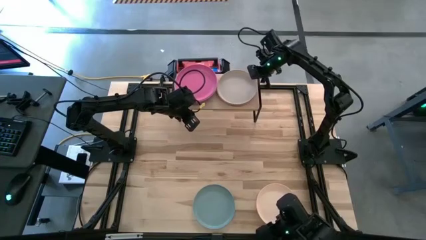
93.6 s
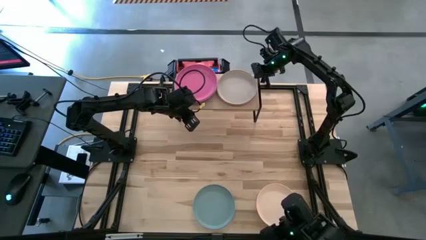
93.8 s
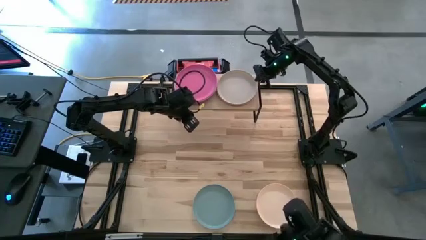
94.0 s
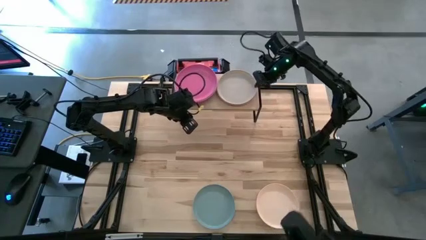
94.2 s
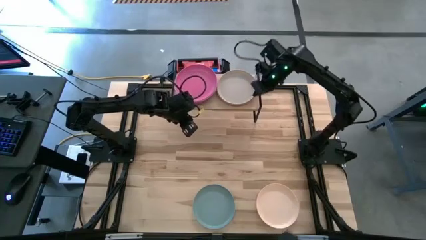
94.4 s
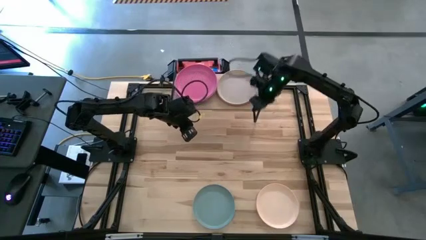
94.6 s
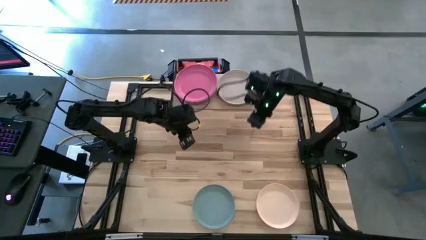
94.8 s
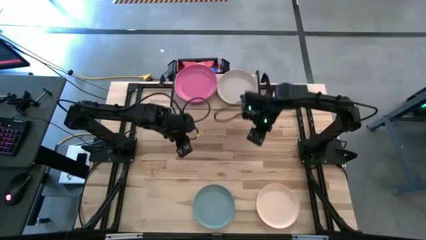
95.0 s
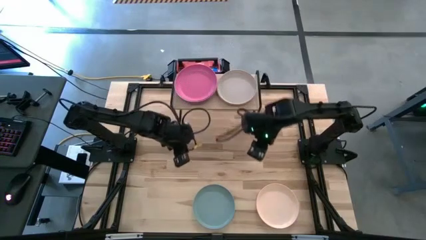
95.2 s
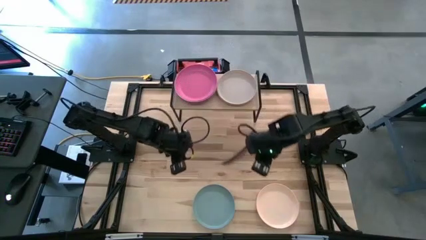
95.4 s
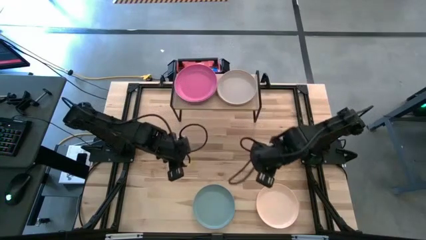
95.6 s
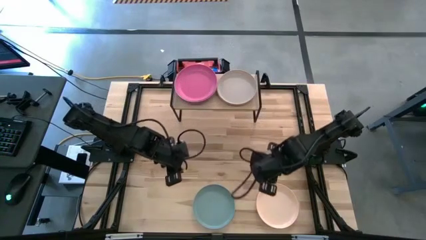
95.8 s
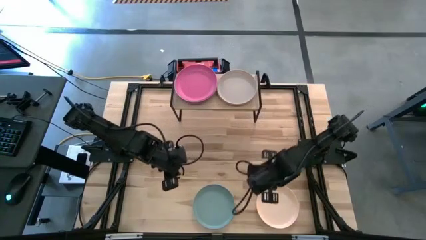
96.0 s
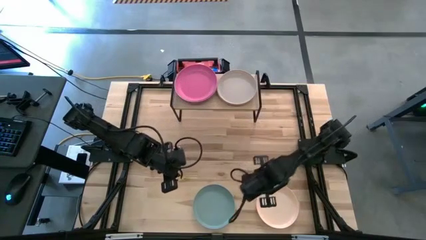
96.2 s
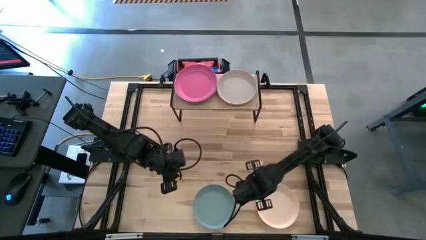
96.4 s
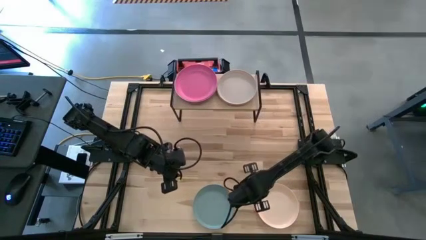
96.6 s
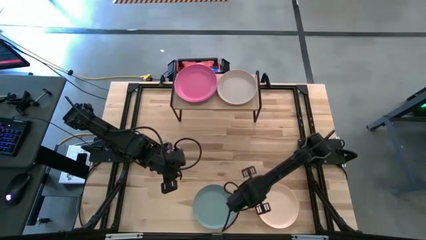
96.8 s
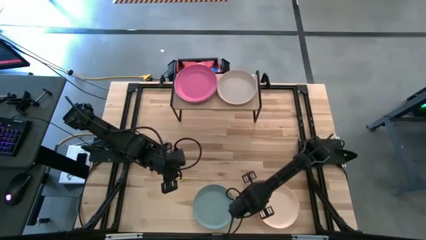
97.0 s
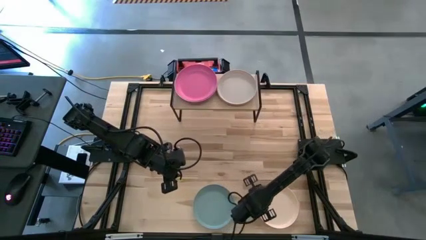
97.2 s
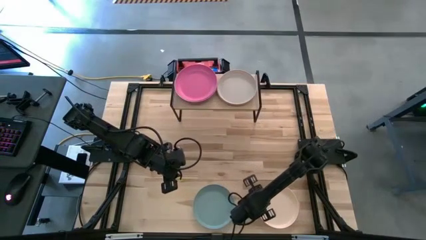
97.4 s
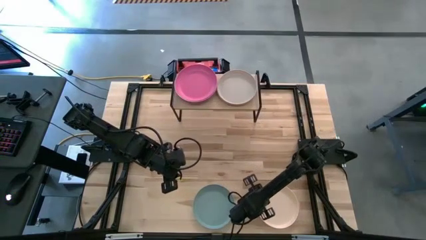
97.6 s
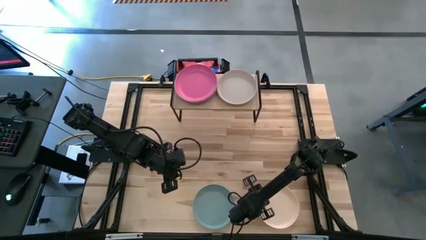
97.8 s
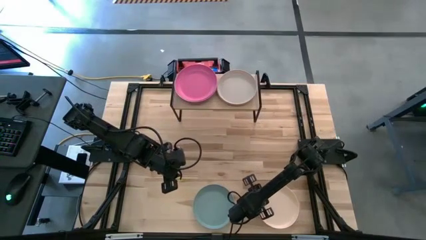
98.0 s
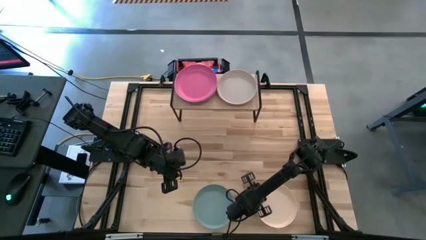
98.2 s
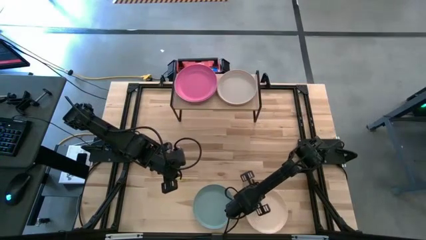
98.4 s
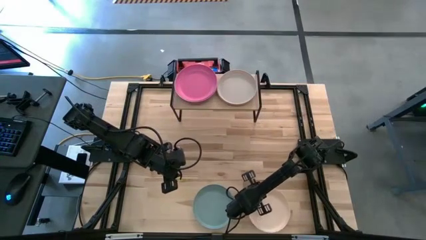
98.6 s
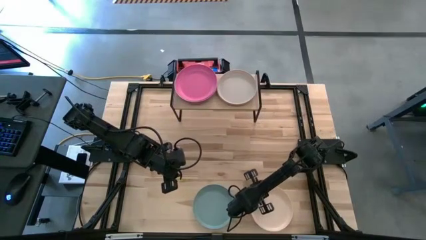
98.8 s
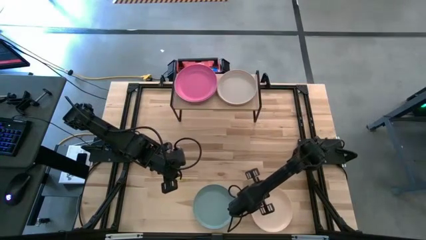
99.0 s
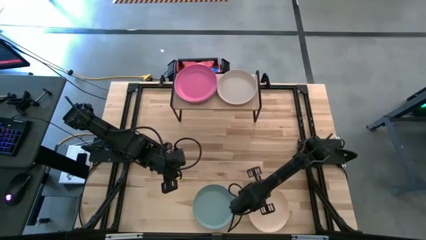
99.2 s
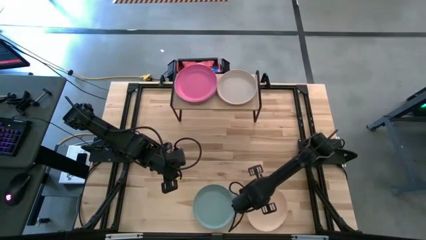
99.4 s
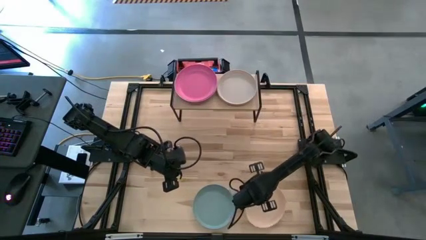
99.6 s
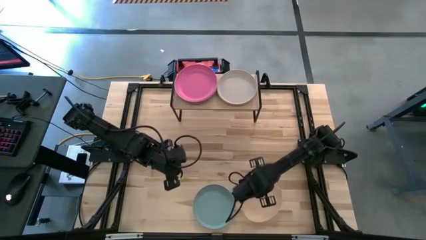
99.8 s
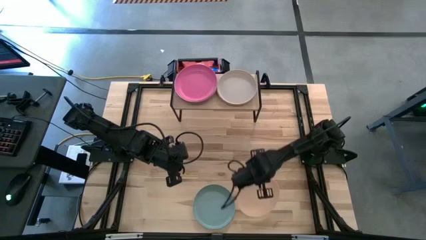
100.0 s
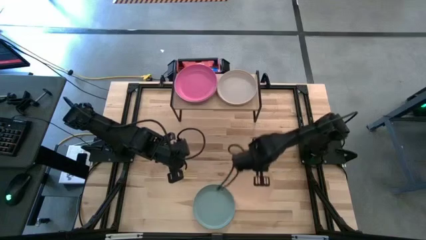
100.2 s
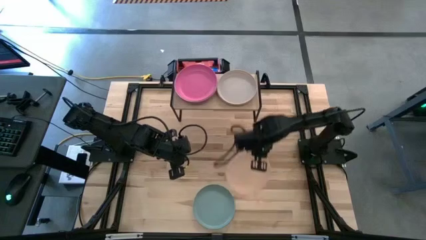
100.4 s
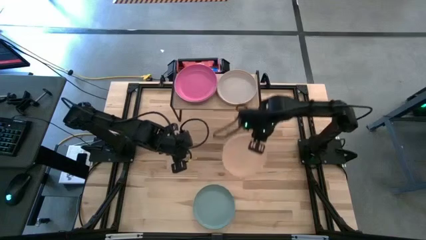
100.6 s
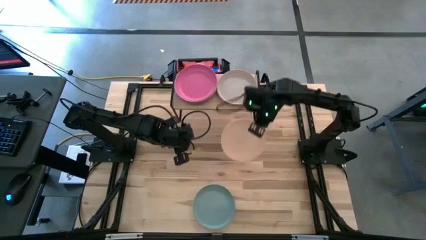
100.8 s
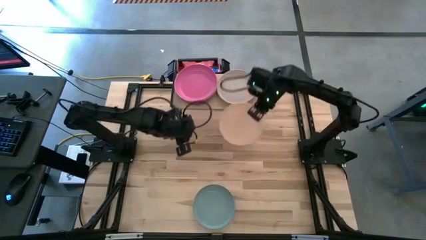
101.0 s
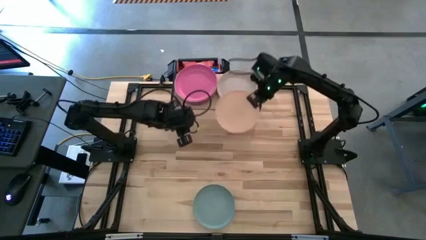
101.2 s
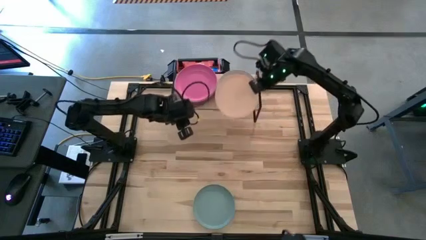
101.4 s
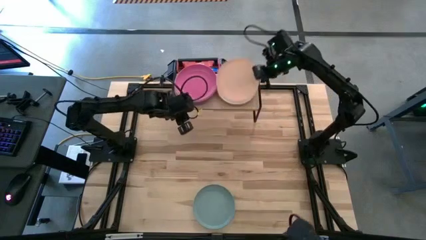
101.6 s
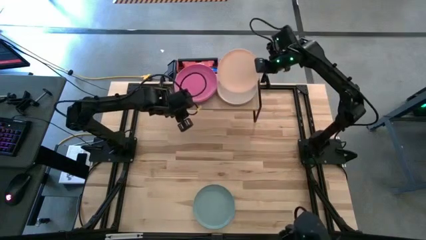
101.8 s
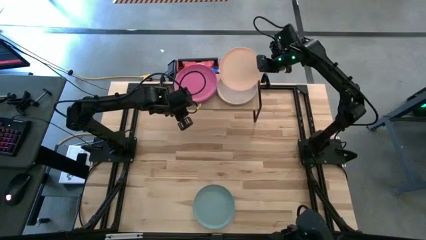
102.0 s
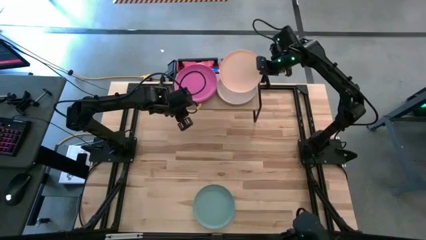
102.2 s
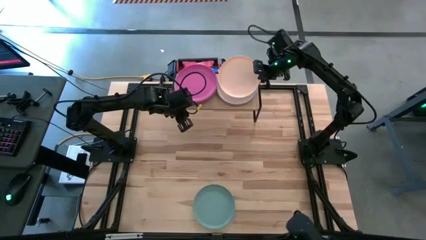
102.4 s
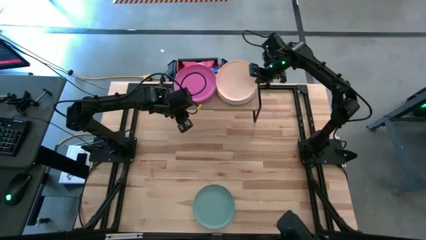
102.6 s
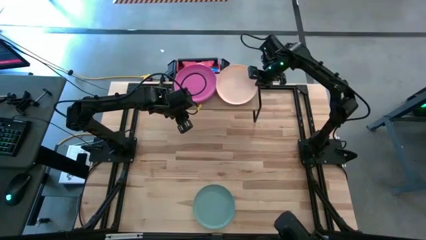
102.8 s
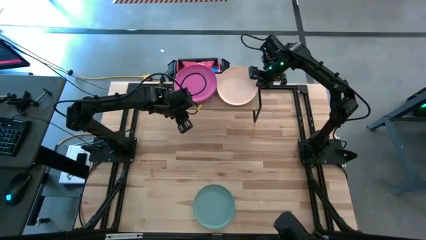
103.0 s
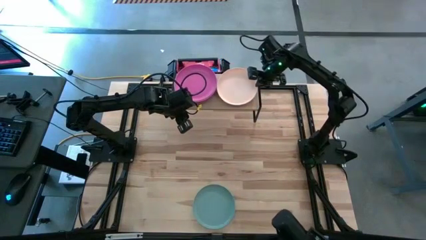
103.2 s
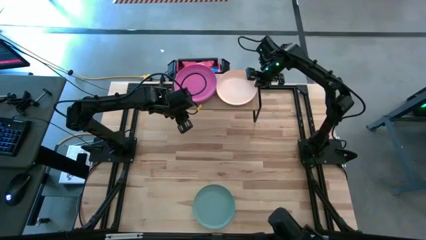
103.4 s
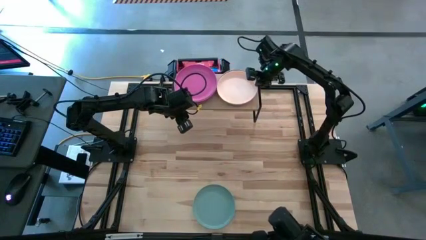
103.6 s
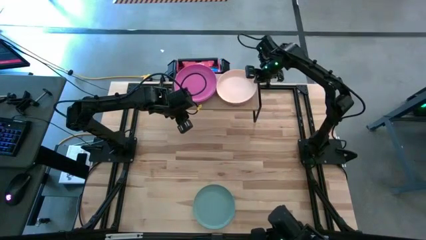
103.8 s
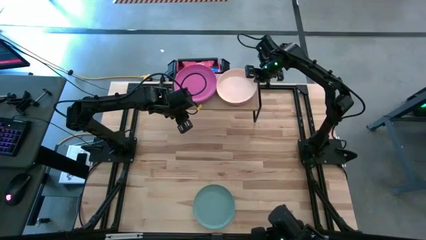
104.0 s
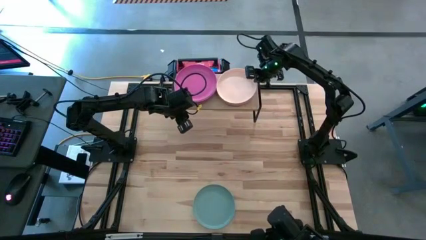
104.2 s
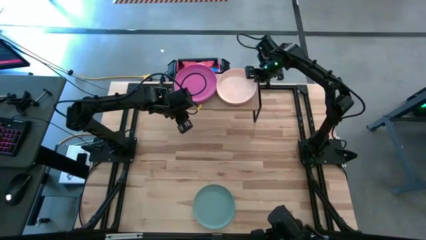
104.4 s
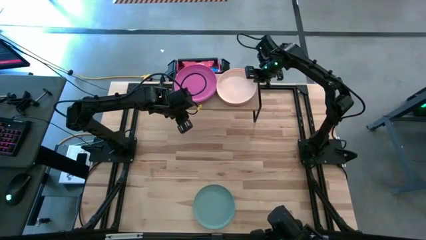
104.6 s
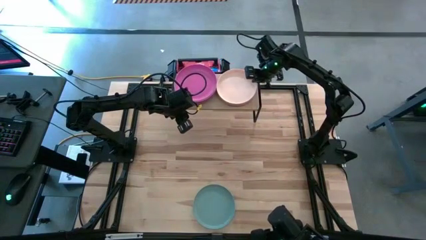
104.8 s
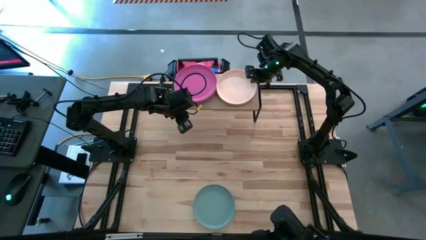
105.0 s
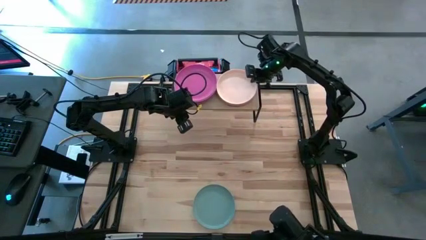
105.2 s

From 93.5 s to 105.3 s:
Task: Place and stack plates onto a shelf
Stack the light orange plate on top of the light gray plate on the shelf

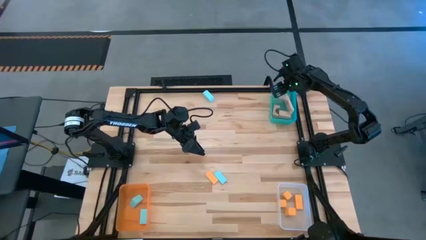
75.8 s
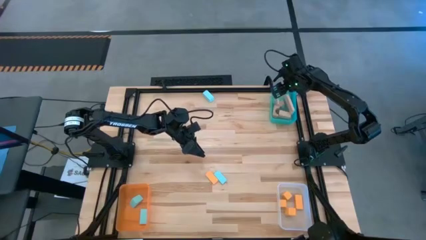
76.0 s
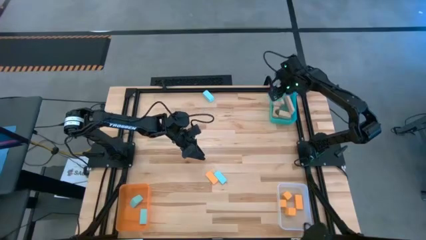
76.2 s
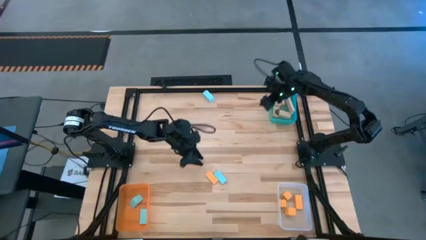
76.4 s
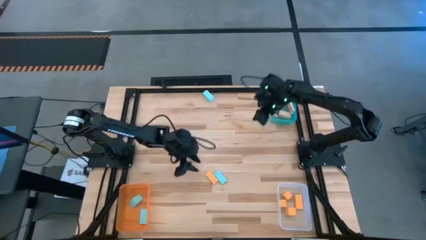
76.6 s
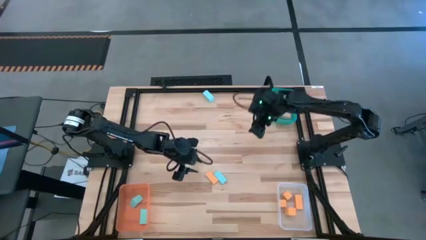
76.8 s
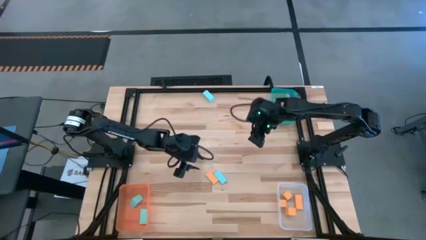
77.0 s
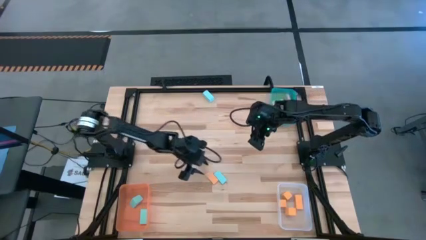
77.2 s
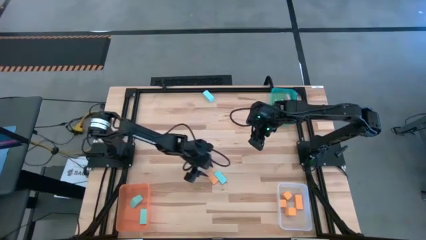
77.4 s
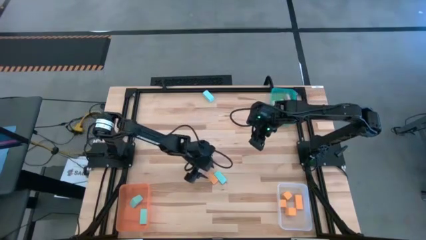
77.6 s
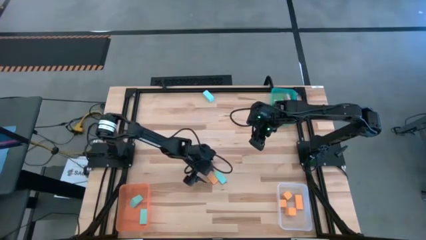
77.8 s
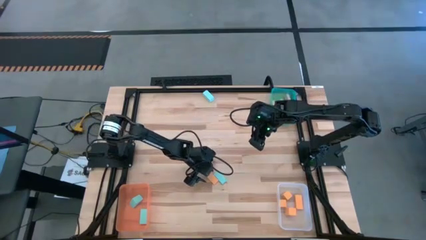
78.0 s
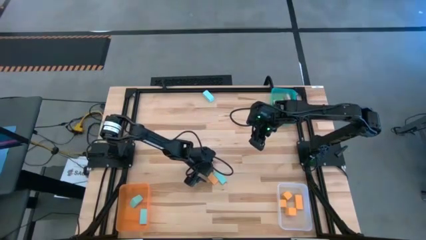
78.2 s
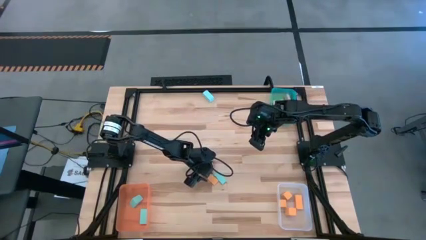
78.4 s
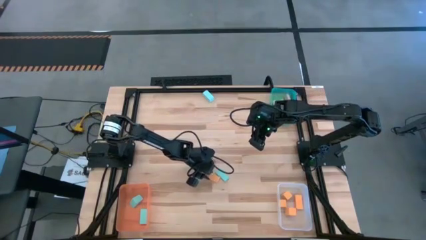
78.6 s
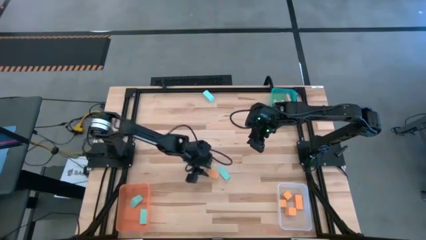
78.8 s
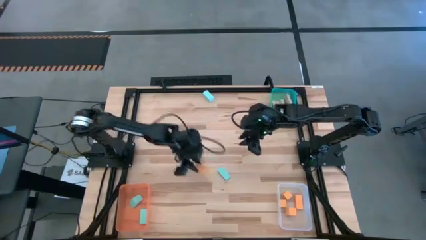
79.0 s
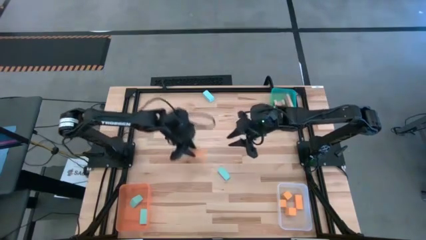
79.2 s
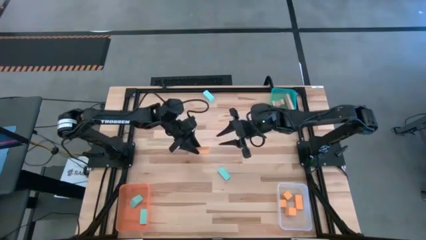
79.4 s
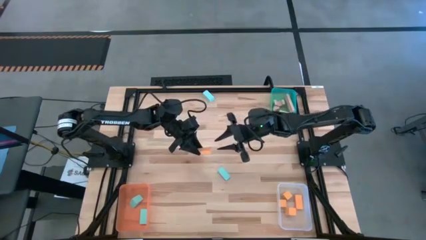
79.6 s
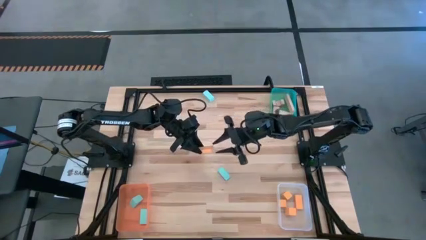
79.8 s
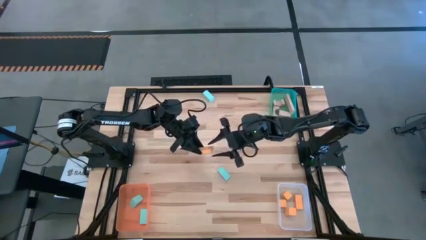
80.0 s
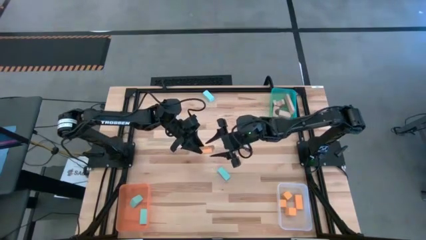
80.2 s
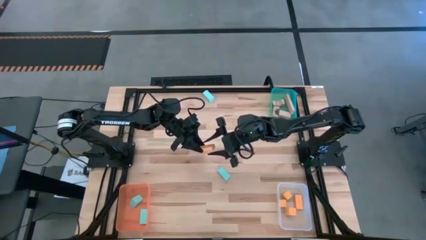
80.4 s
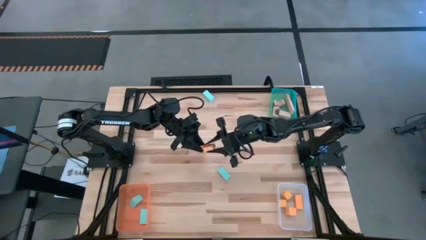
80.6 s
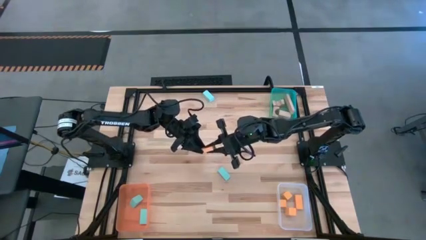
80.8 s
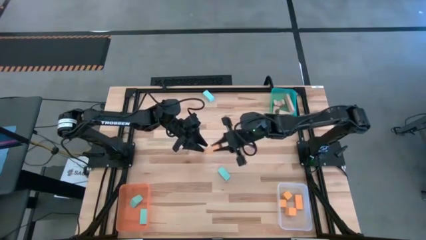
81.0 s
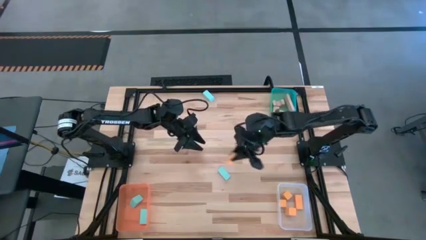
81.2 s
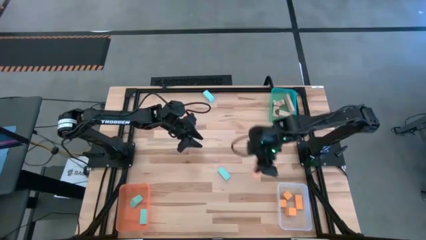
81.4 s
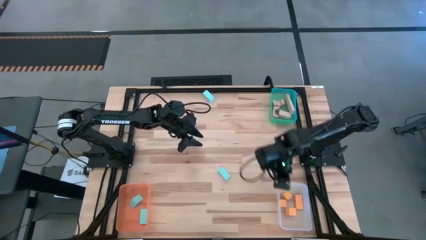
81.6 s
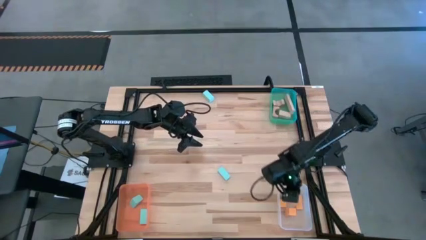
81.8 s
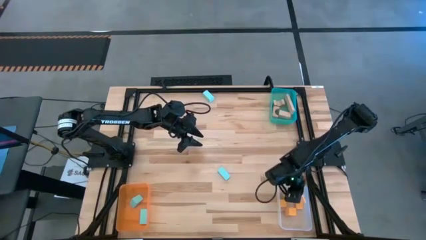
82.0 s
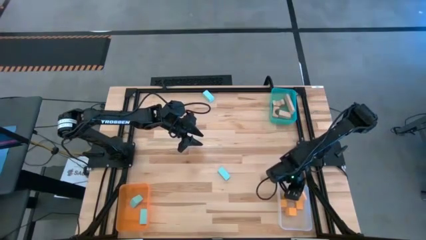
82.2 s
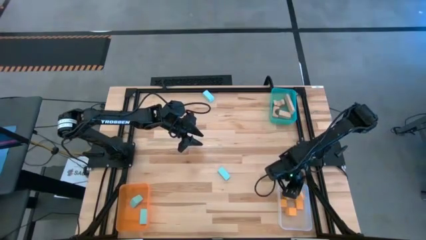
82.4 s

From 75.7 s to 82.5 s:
Task: Sort & place blocks by color
Put the yellow block into the transparent bin
